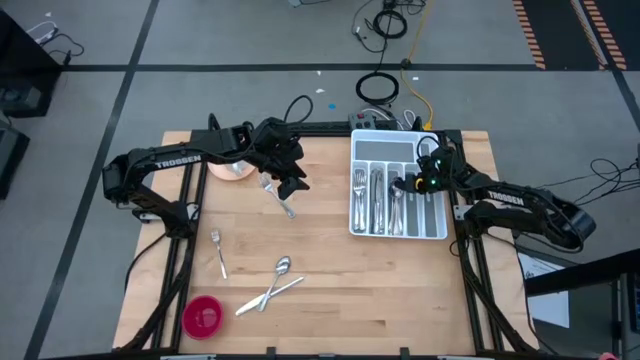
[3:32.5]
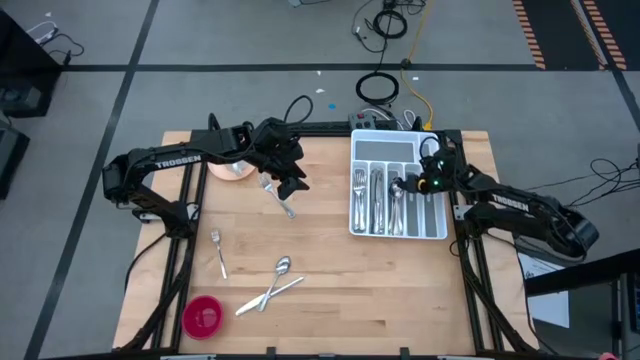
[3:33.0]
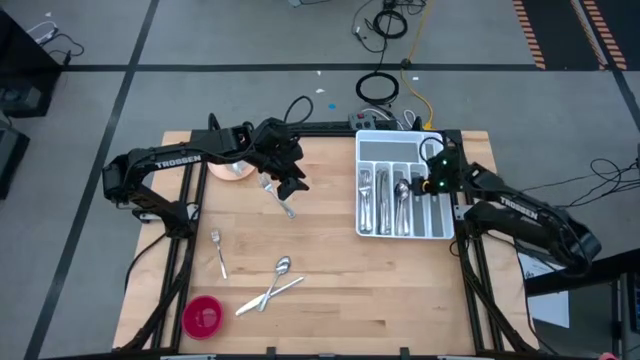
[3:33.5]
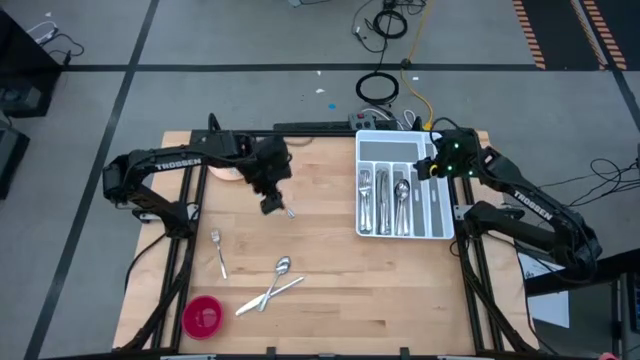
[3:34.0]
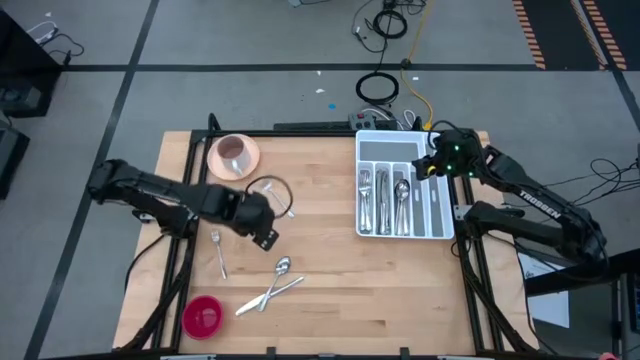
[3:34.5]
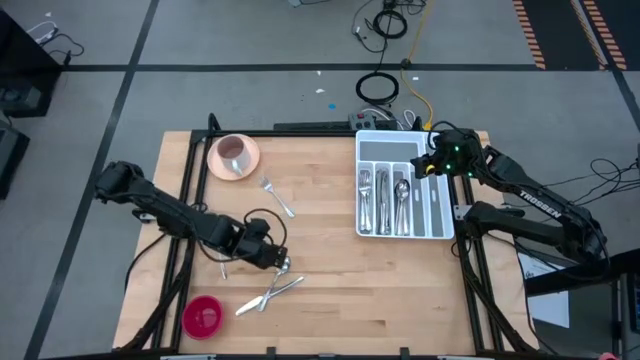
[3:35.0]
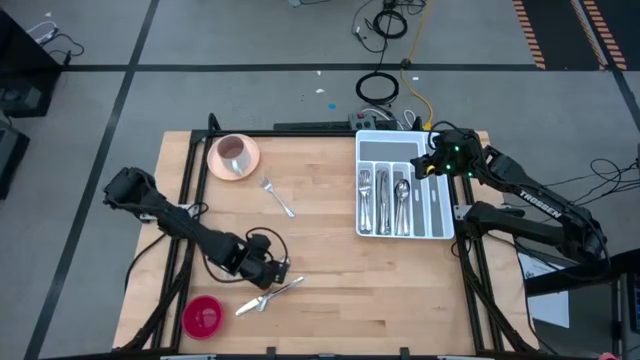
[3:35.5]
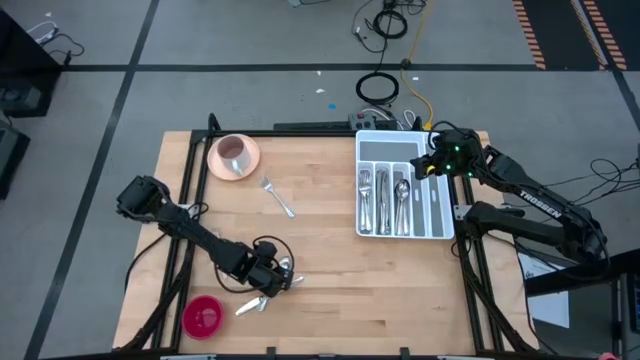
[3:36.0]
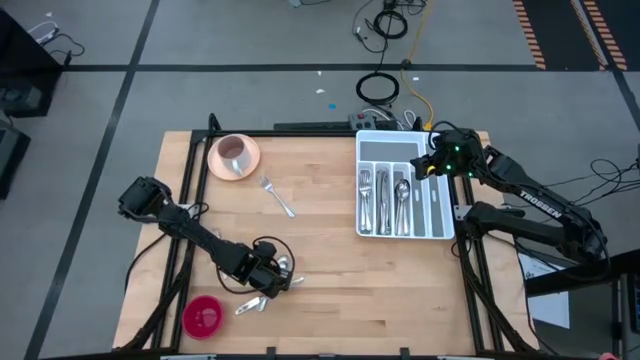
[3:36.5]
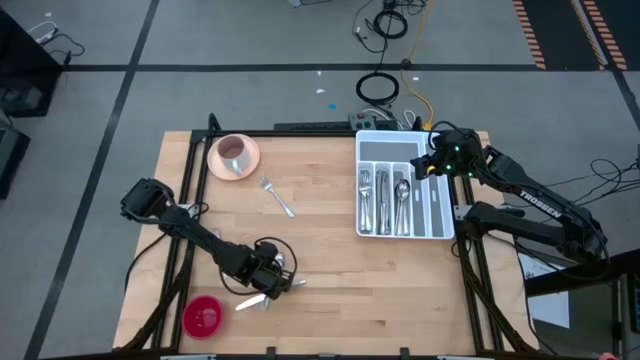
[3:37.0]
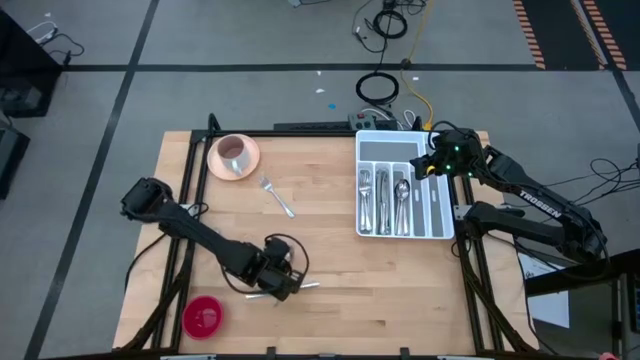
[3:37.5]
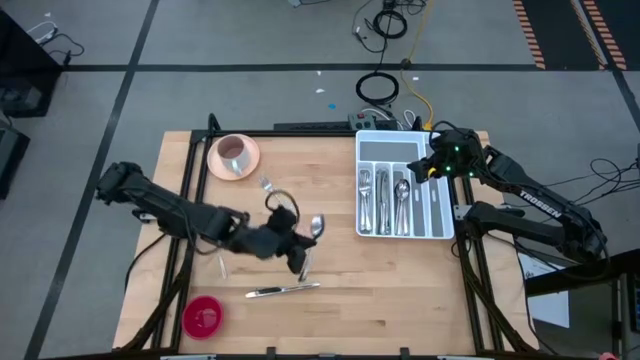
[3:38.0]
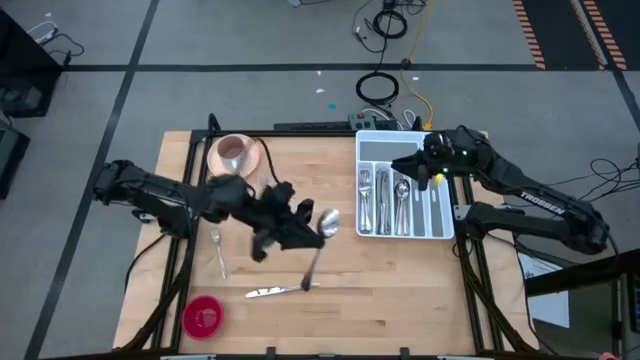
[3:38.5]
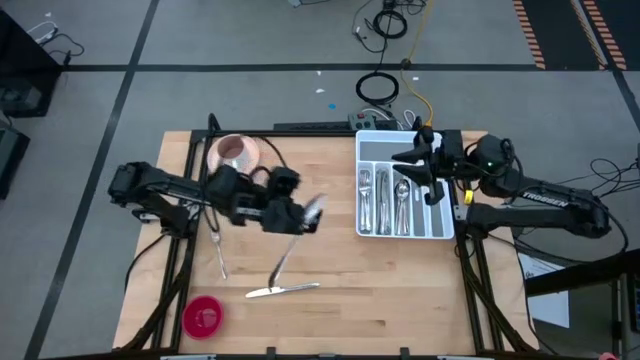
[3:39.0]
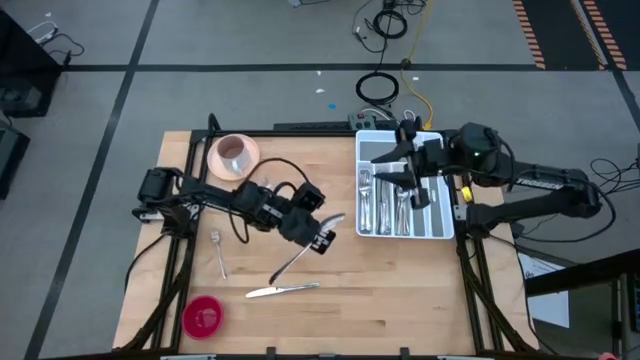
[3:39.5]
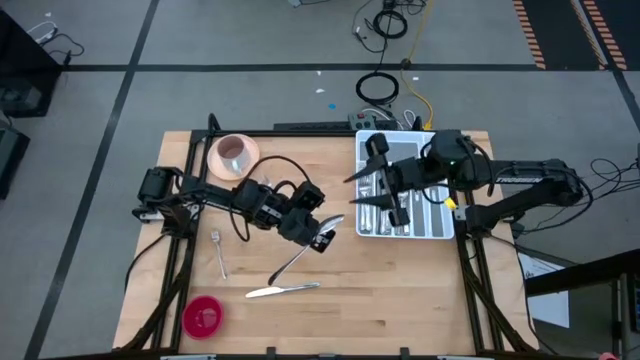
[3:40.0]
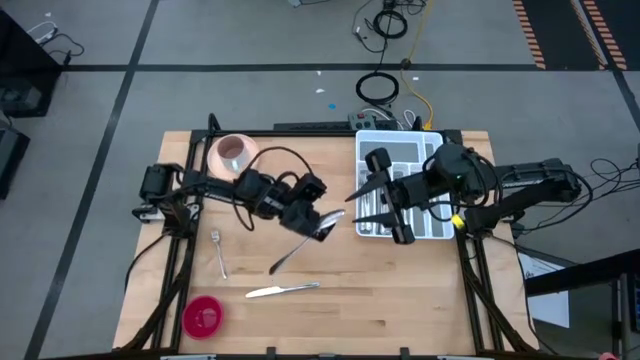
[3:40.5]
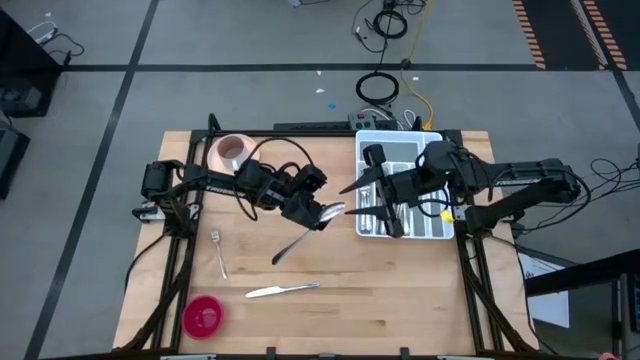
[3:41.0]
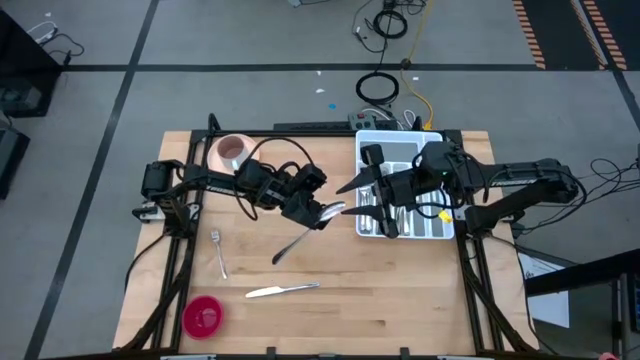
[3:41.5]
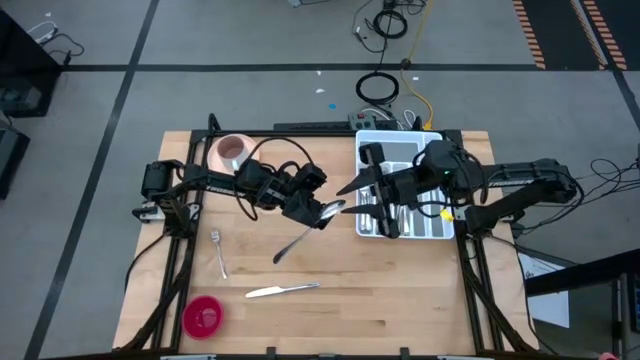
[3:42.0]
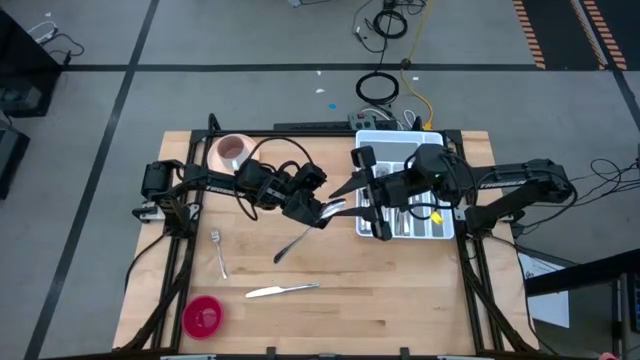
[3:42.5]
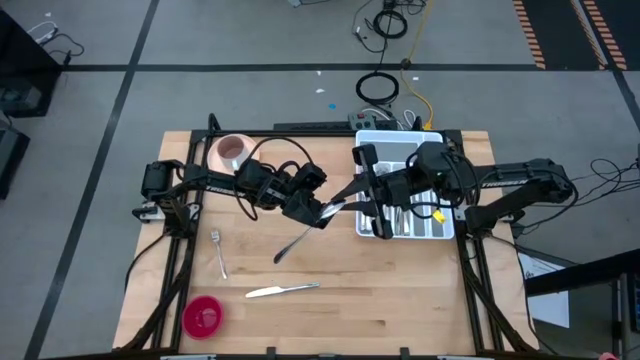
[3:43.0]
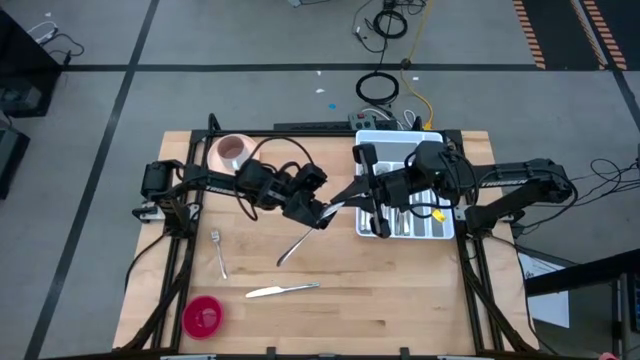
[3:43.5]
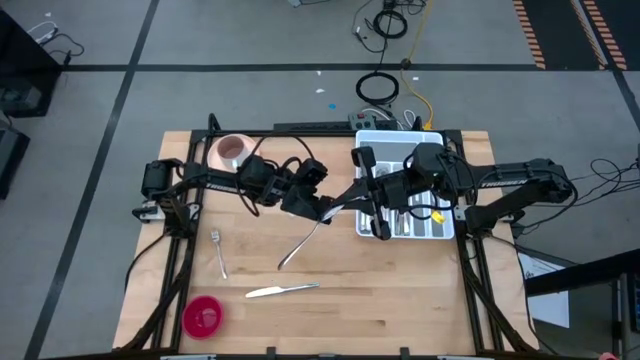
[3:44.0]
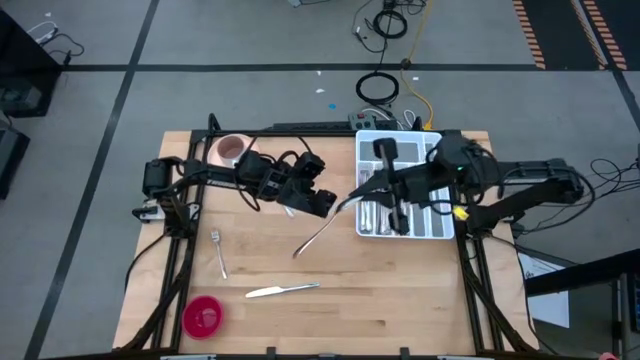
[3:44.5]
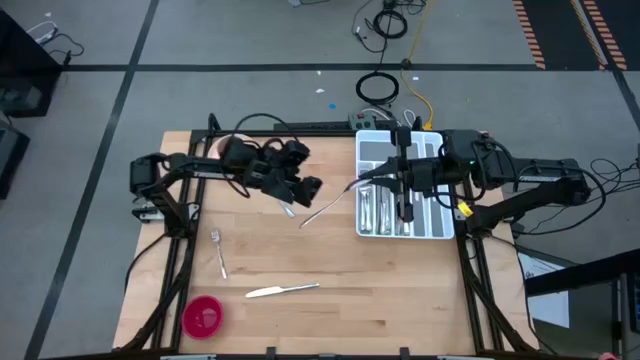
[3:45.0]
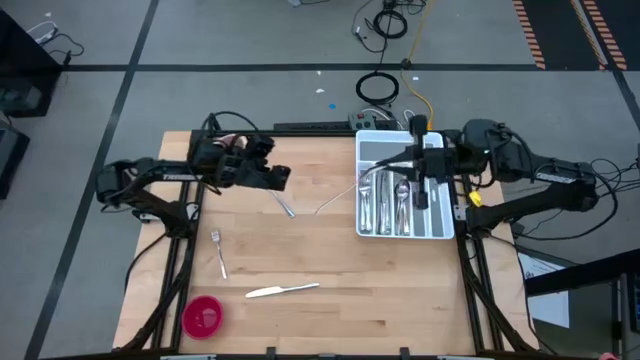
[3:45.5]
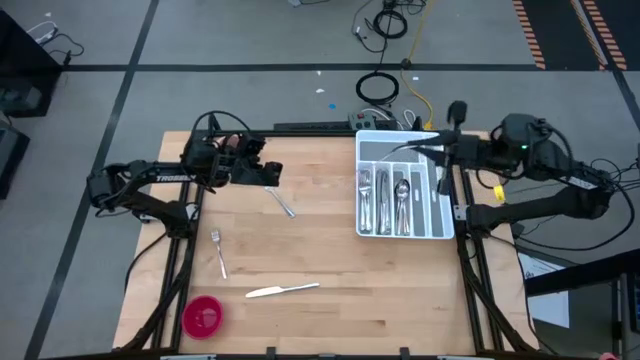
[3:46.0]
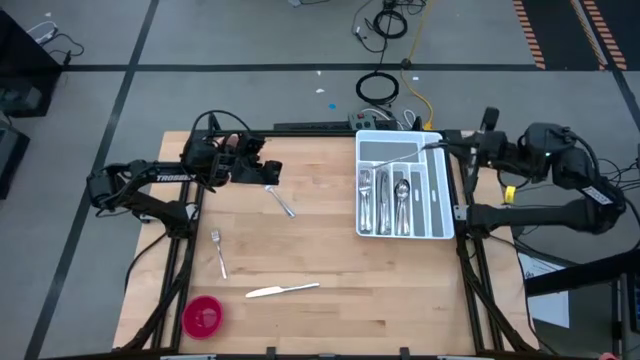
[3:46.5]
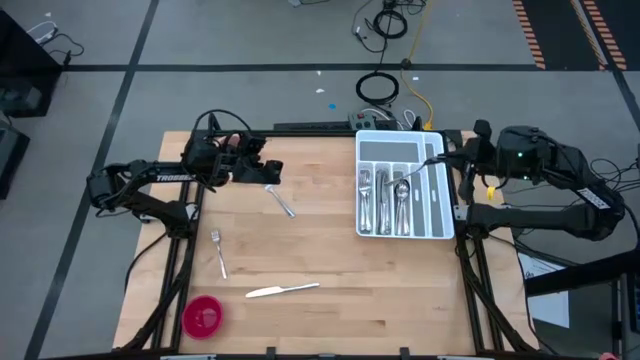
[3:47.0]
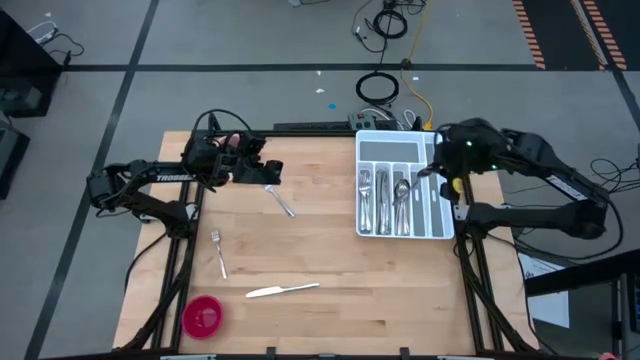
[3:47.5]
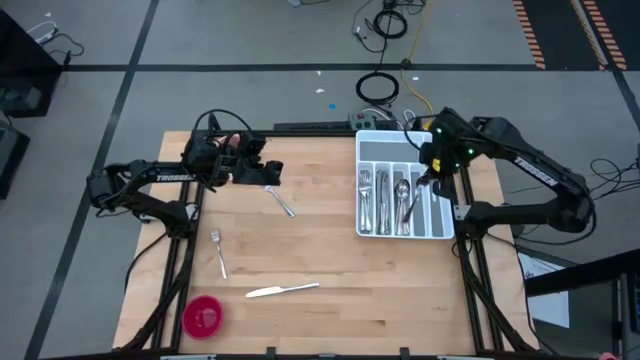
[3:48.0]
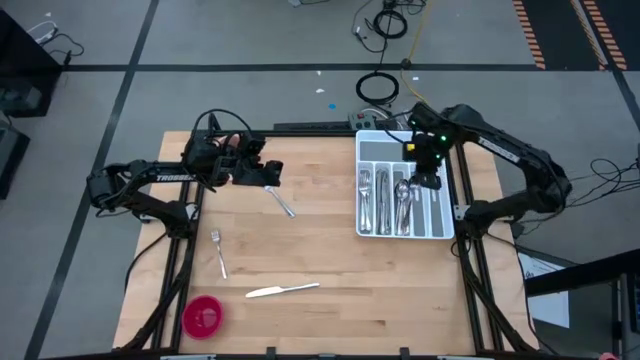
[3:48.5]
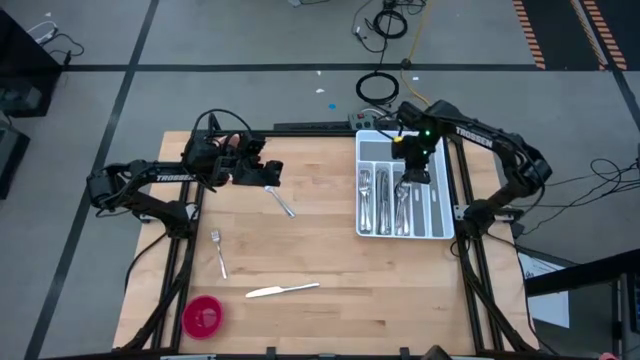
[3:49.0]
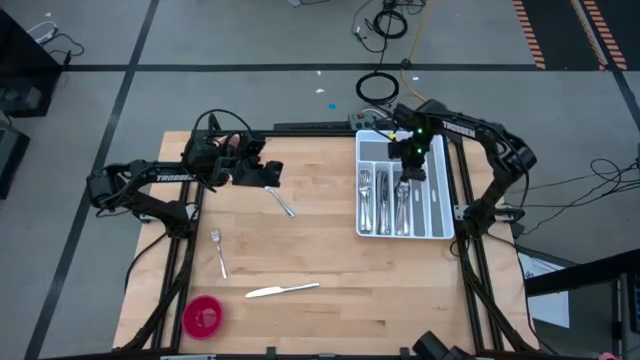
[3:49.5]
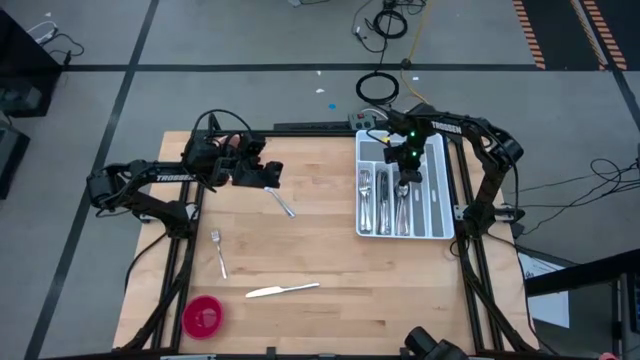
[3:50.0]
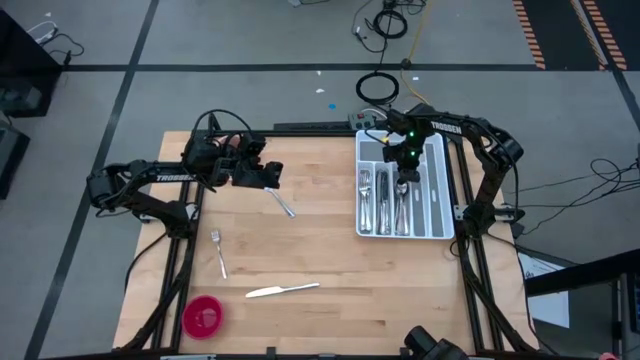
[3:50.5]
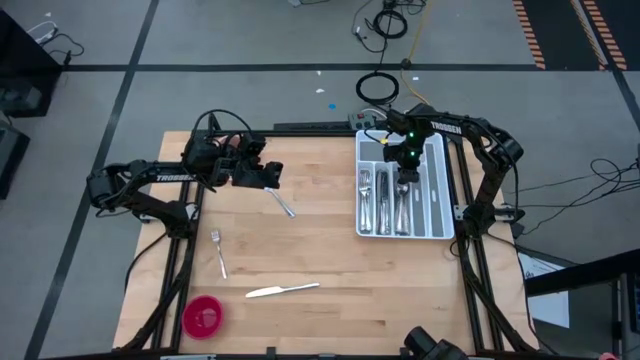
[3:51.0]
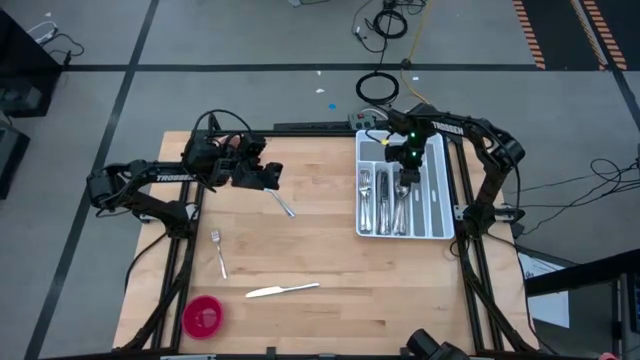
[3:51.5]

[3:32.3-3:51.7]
Task: Sort silverware
Put the silver spoon into the white silverware tray

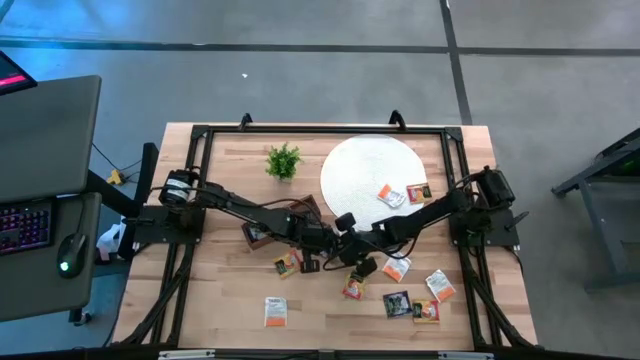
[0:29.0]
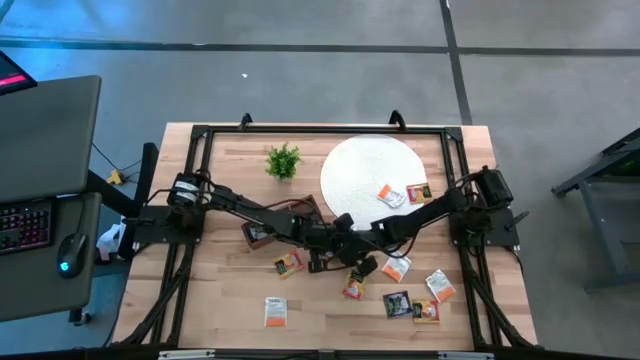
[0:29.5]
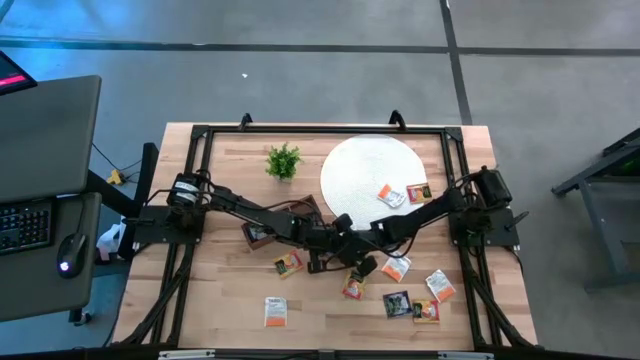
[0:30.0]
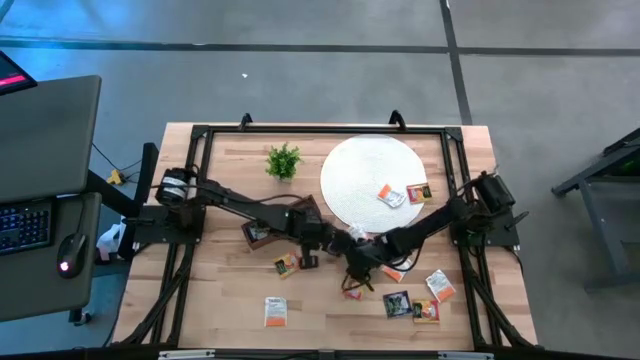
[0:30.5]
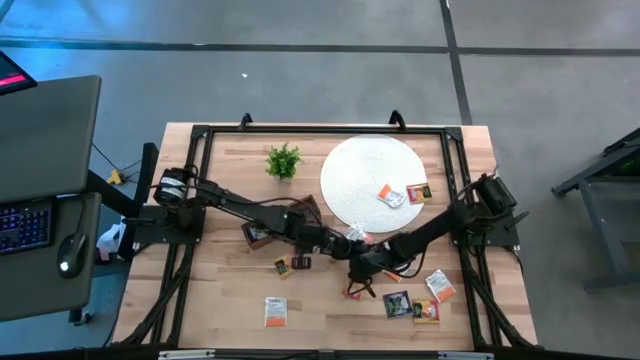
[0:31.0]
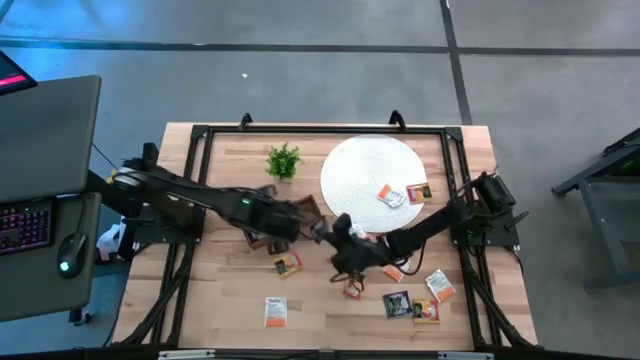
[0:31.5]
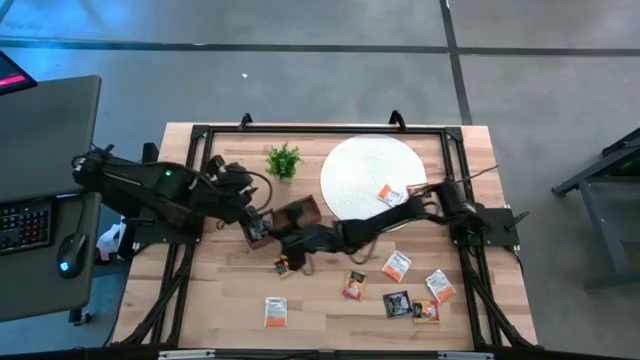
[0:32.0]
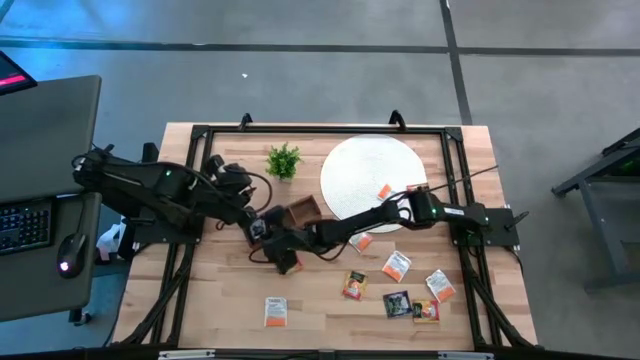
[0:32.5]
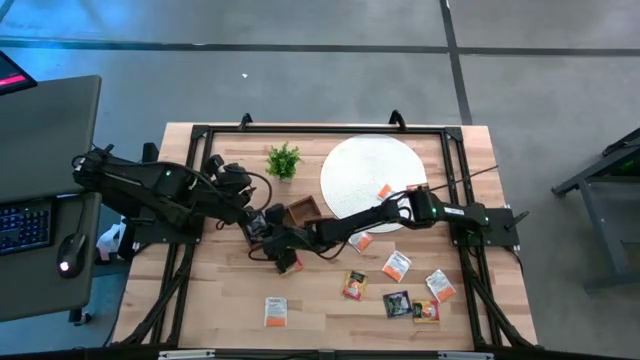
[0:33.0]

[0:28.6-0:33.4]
Task: Pick & Place Tea
Put the purple tea bag into the left section of the wooden organizer
